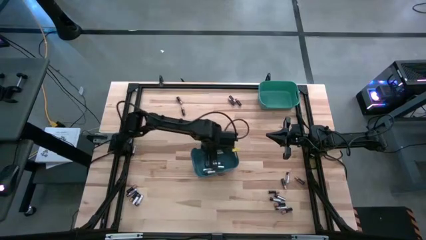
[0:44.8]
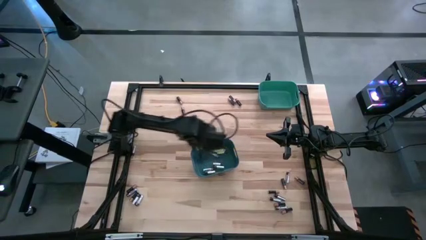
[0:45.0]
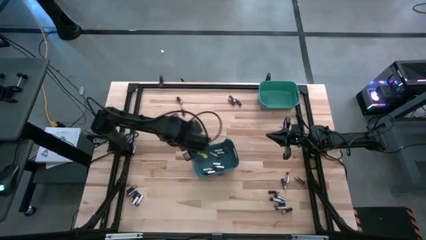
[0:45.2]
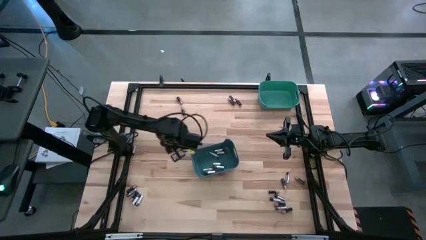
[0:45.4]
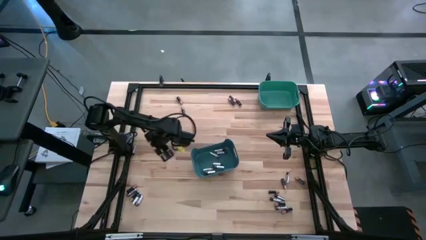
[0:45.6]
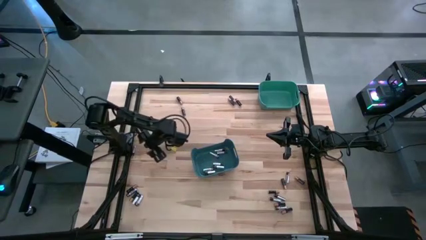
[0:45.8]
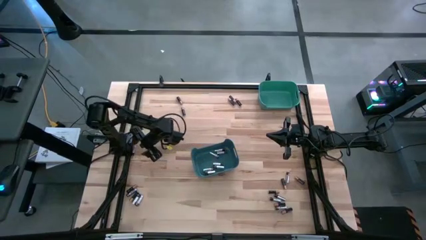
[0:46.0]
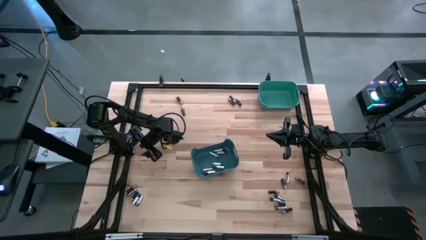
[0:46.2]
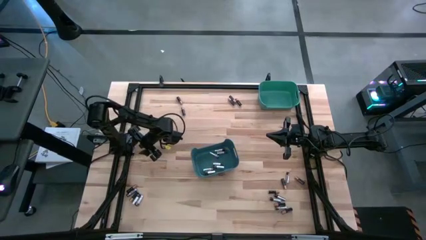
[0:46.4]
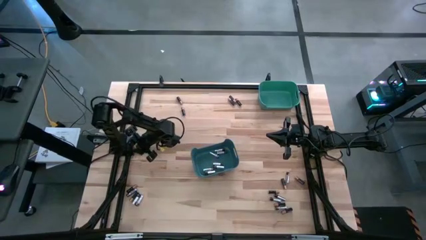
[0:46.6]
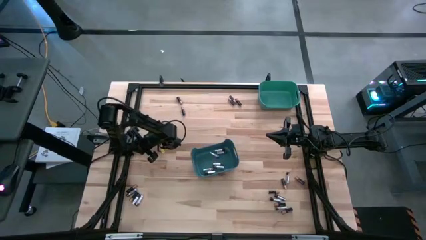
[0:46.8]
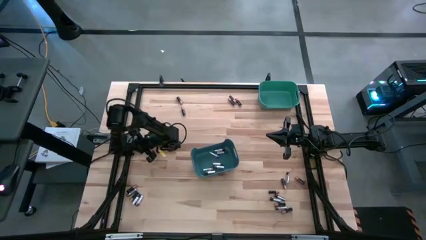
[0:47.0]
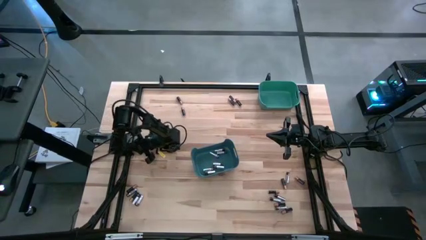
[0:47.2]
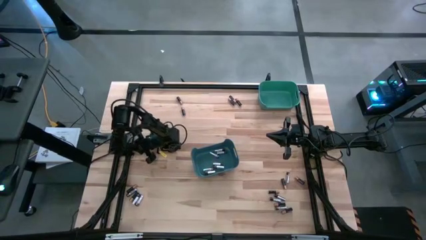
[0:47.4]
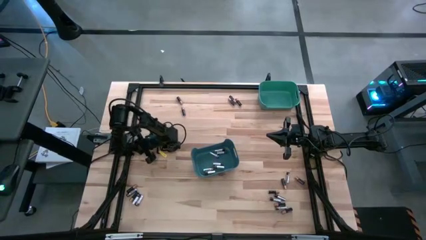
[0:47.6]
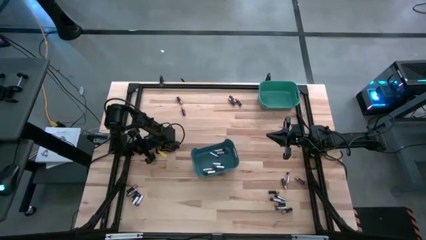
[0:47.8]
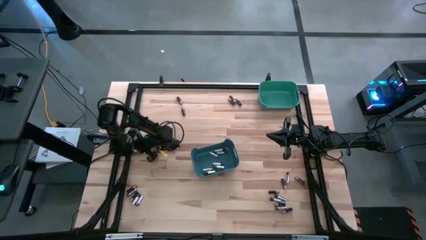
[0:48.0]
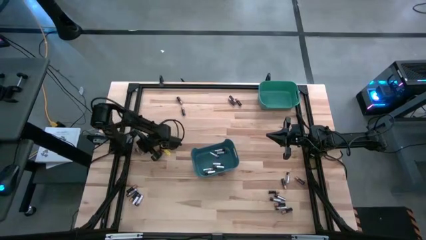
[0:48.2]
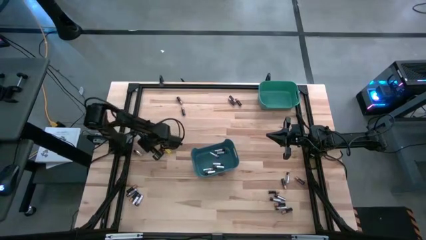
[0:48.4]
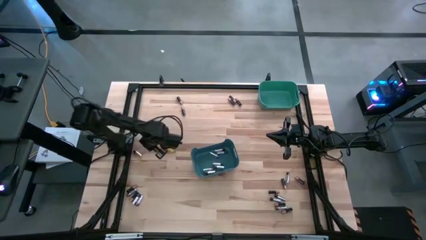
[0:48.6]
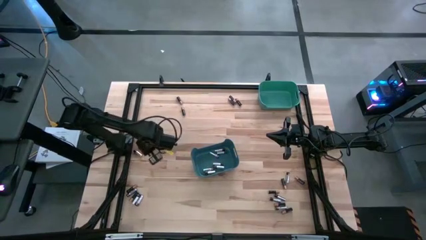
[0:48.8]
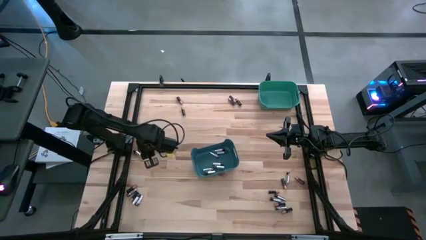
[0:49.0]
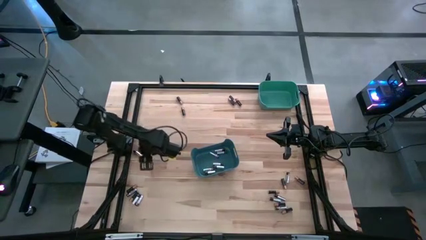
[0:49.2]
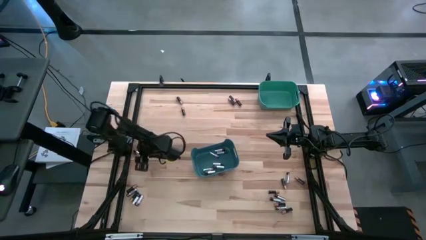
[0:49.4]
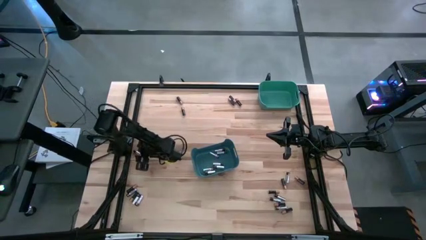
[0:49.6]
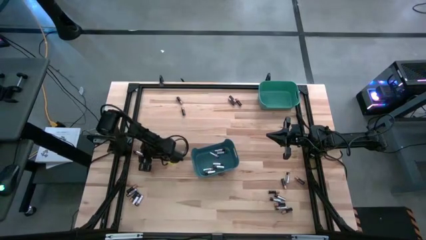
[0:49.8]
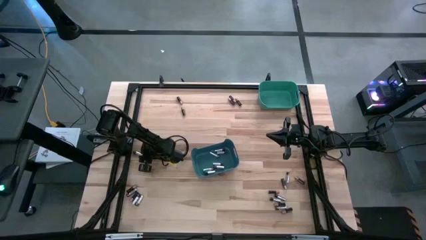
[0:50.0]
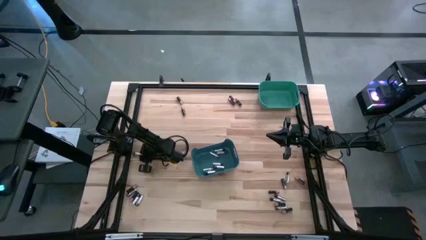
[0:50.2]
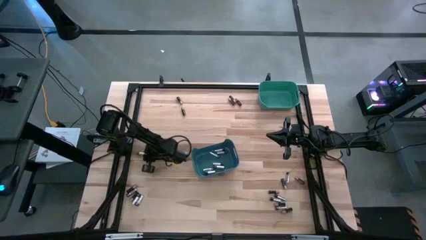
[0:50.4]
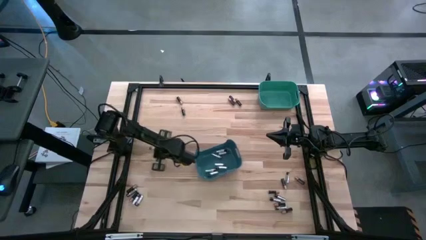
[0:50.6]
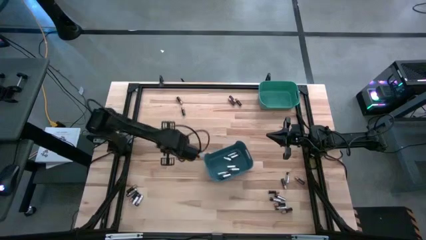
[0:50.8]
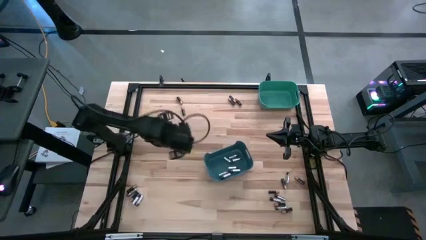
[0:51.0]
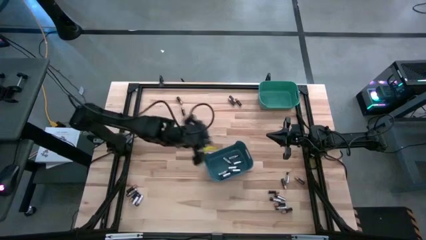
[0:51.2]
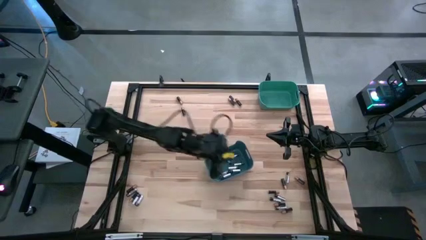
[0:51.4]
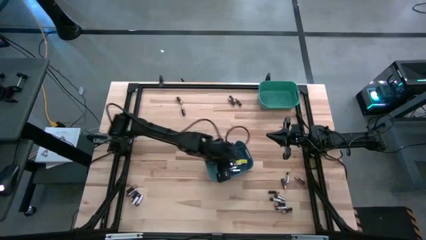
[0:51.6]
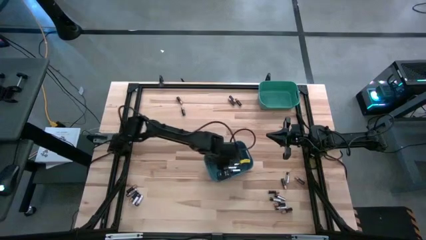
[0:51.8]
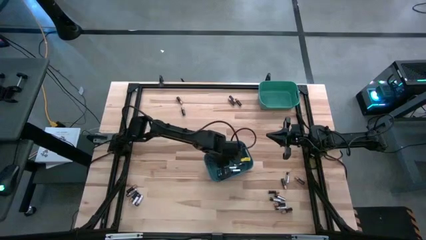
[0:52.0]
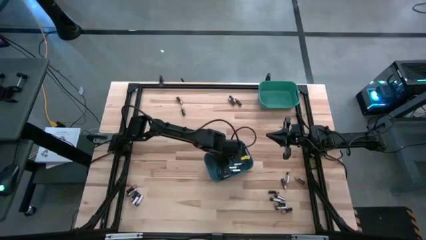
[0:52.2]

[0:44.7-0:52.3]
Task: Sort batteries
Put the silver battery into the blue bin

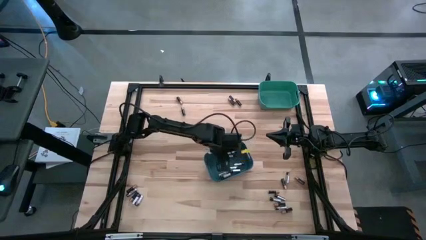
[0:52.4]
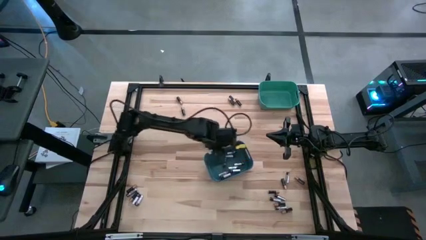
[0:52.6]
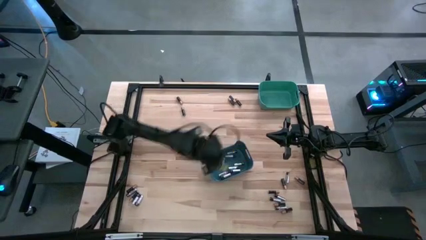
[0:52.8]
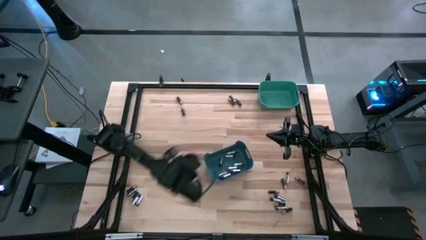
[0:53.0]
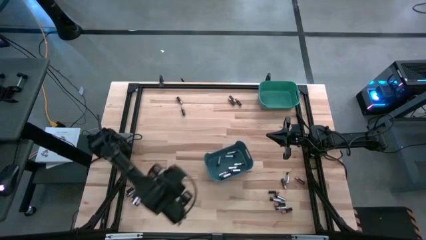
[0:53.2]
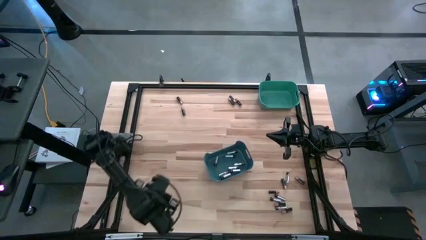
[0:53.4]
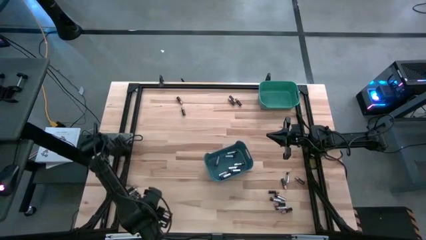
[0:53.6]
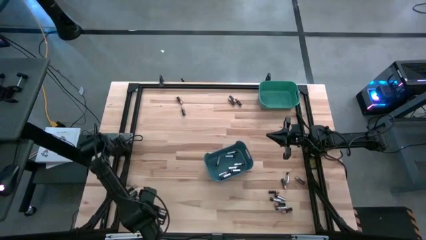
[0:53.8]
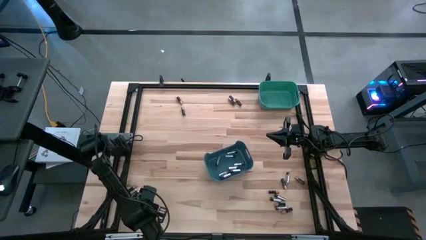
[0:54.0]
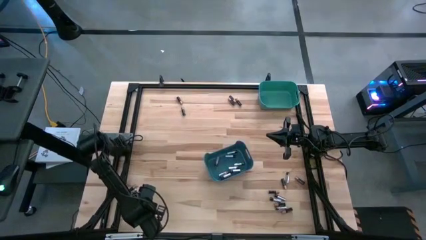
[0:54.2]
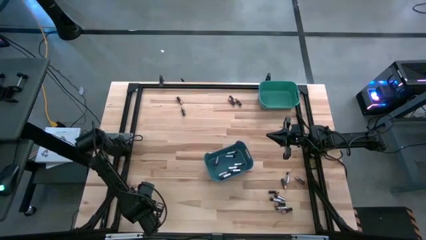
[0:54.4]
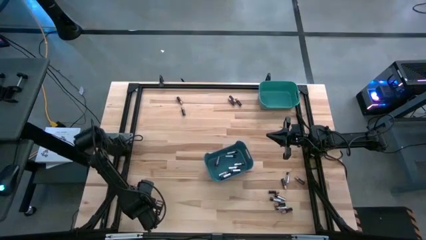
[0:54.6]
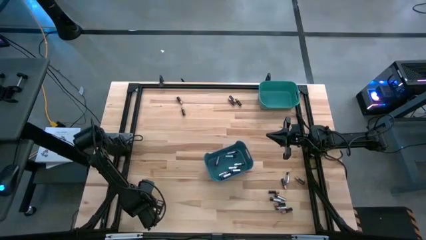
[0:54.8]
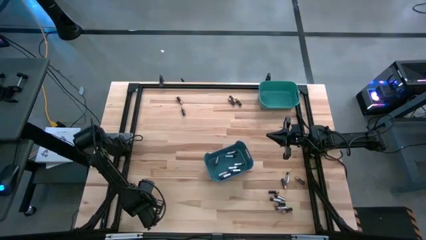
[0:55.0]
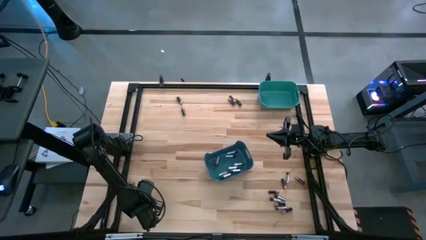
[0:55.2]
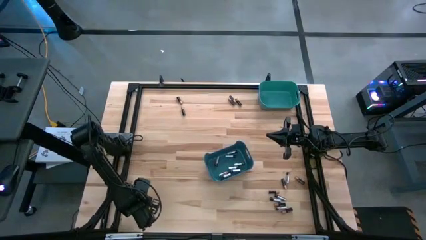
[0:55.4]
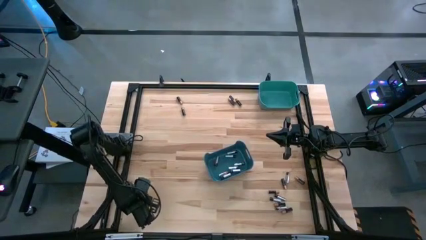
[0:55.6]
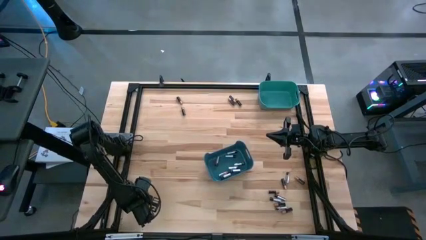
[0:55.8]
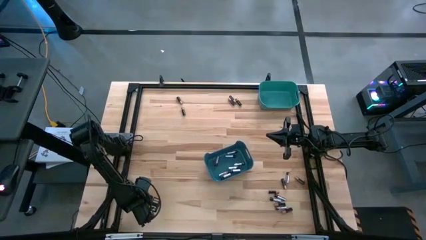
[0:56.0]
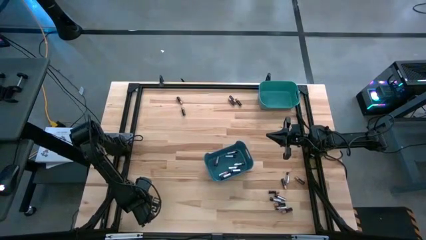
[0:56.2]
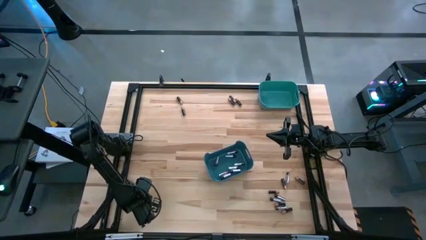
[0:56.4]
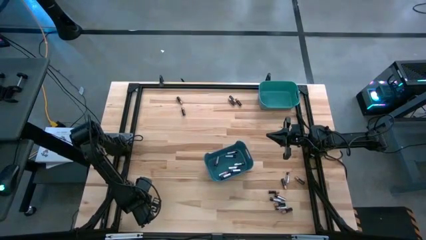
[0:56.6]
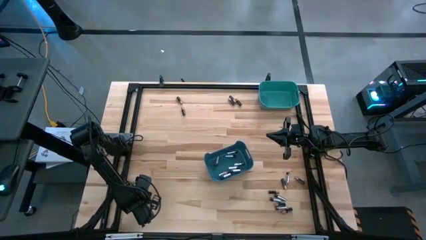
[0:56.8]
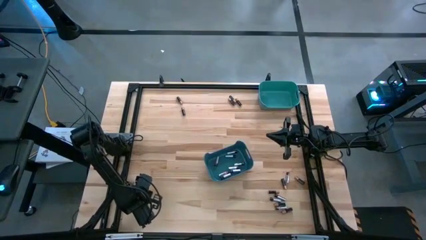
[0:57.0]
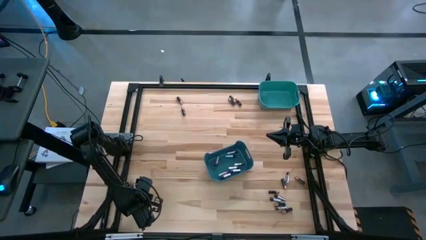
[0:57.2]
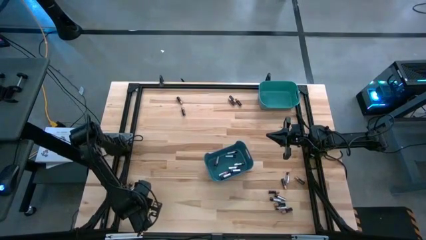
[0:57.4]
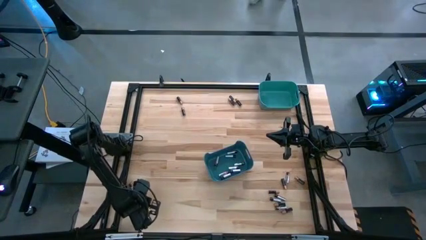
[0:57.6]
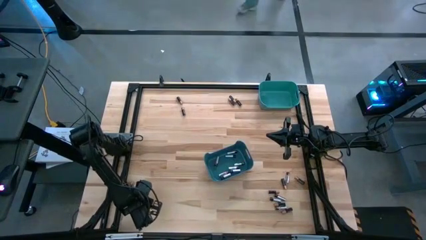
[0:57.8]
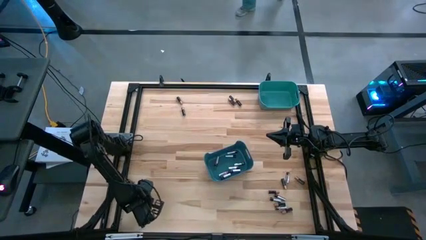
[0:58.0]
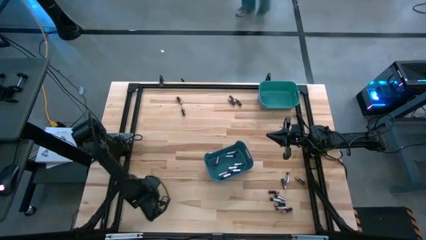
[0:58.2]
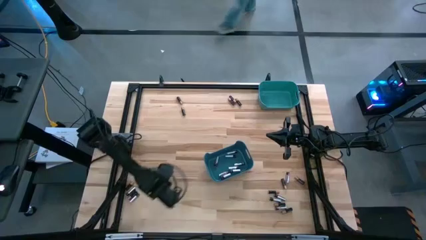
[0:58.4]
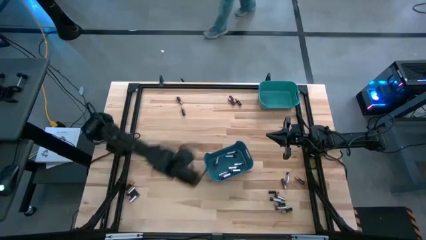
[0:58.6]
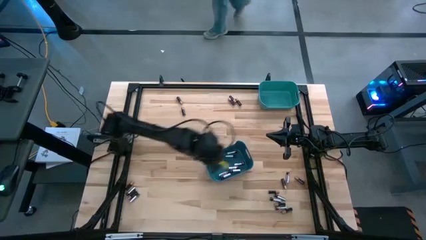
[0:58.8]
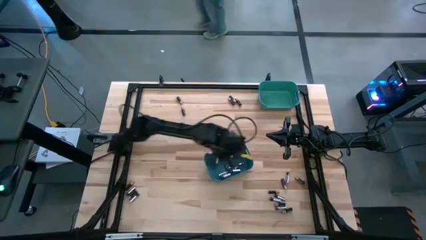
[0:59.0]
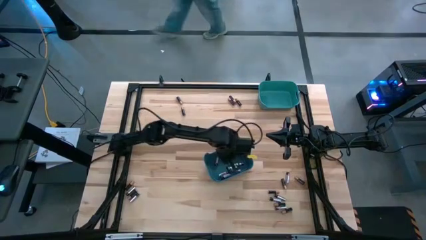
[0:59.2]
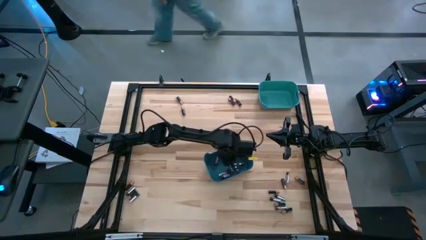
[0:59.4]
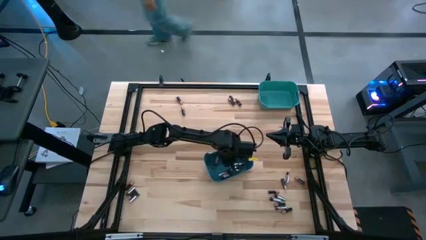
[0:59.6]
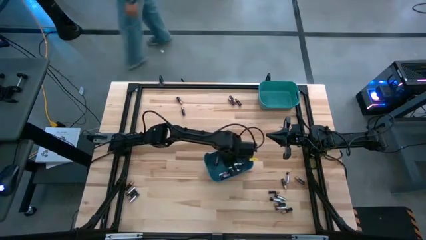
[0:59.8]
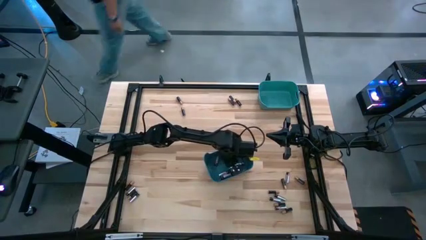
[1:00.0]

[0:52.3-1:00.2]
Put the silver battery into the blue bin

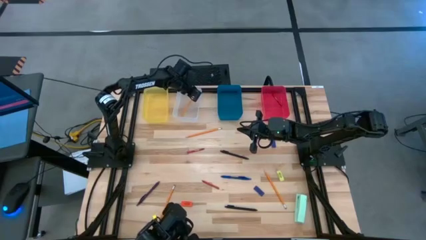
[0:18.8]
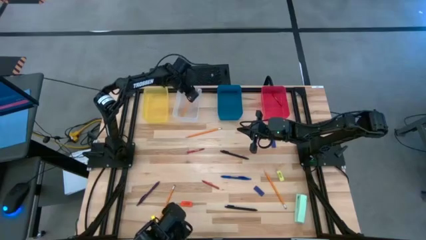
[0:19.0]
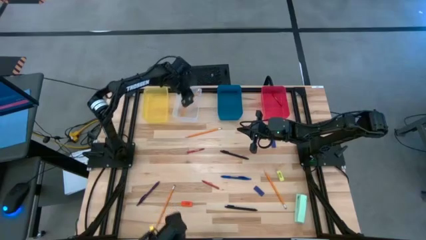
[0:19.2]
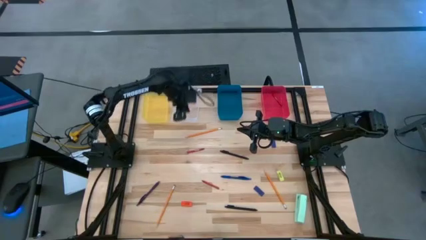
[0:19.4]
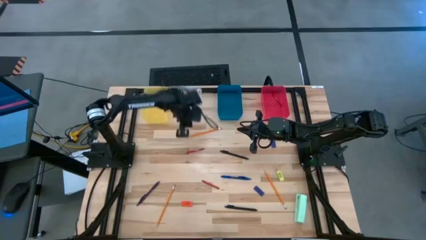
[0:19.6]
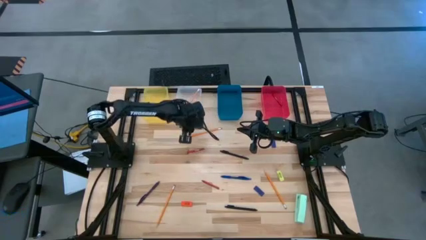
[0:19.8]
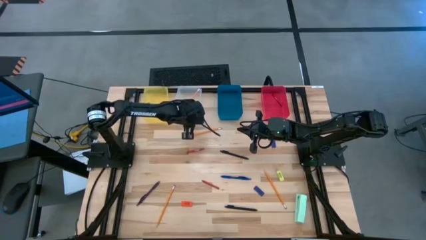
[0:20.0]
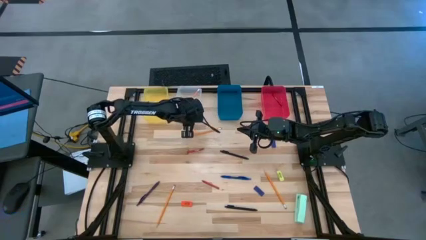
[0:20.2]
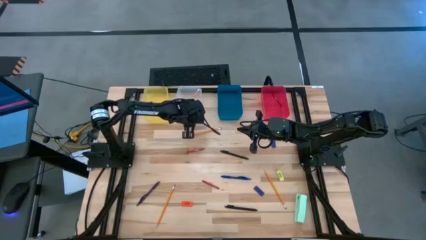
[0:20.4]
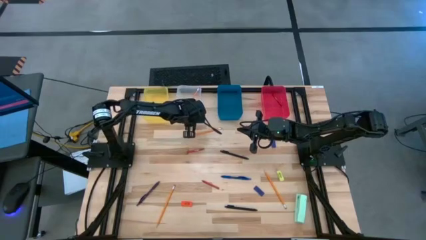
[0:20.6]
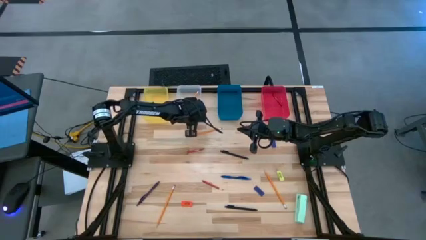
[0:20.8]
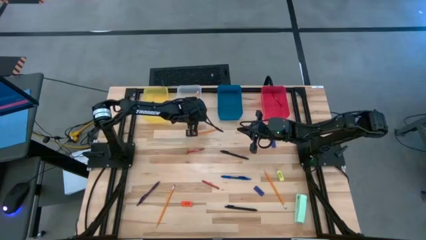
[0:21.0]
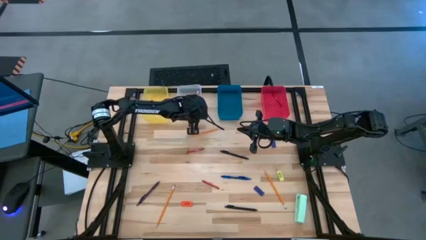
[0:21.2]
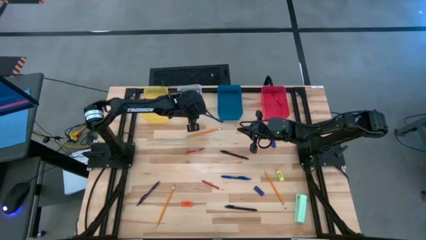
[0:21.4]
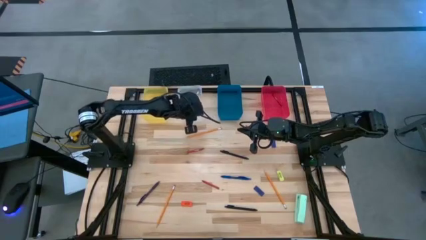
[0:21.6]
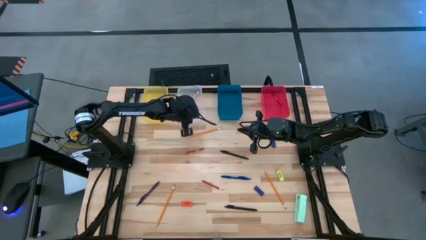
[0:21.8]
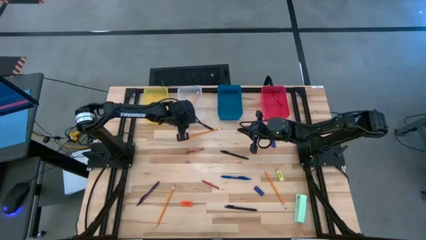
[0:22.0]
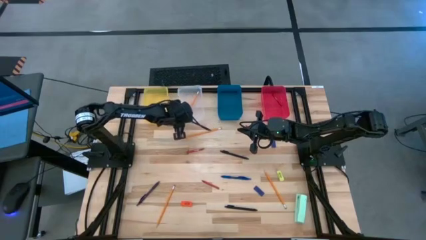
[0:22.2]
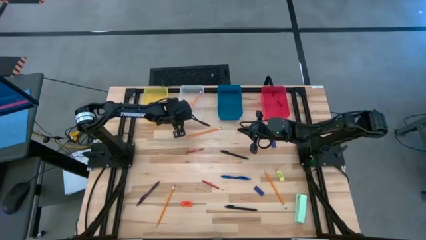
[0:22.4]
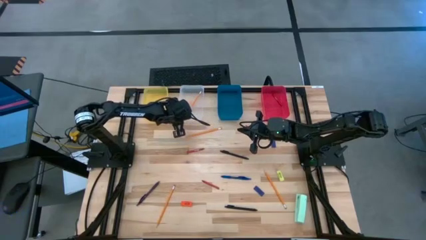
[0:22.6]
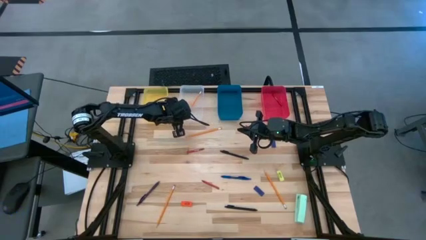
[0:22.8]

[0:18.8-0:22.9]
Task: Sort crayons/erasers/pens/pencils in bins
Adjust the transparent bin on the table
